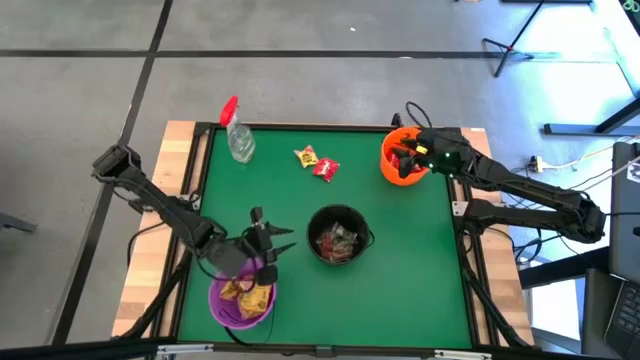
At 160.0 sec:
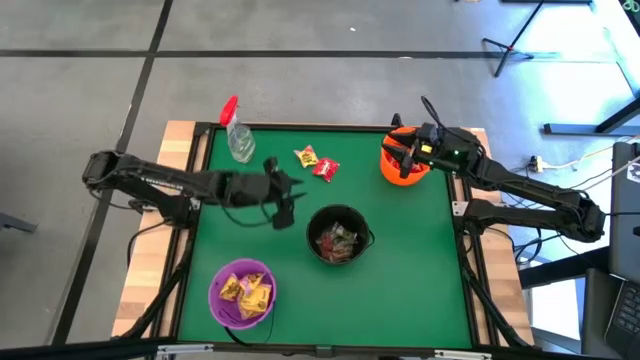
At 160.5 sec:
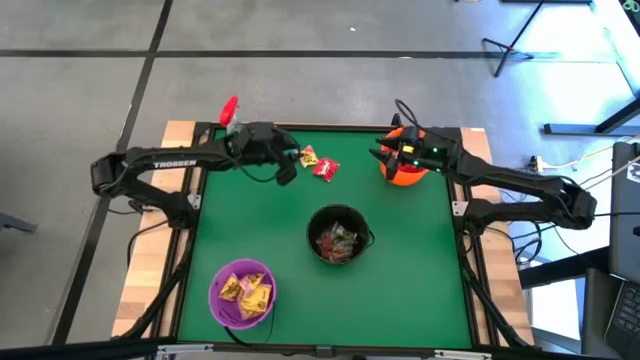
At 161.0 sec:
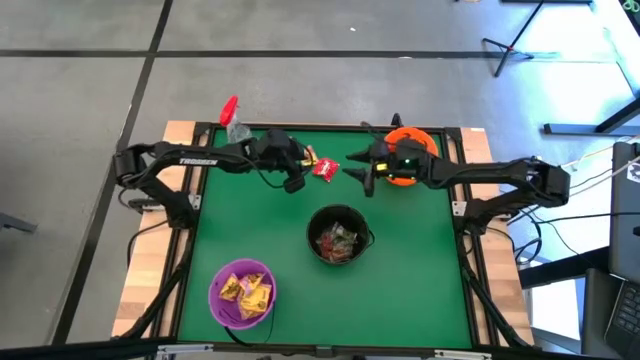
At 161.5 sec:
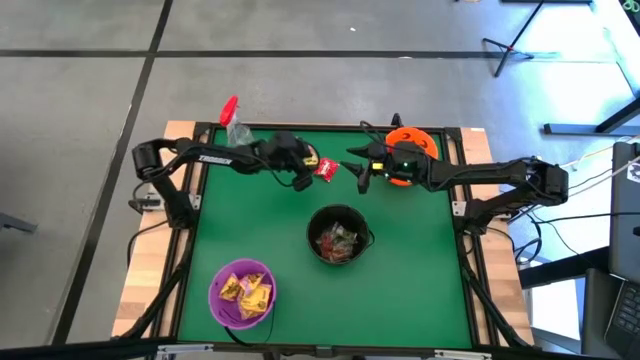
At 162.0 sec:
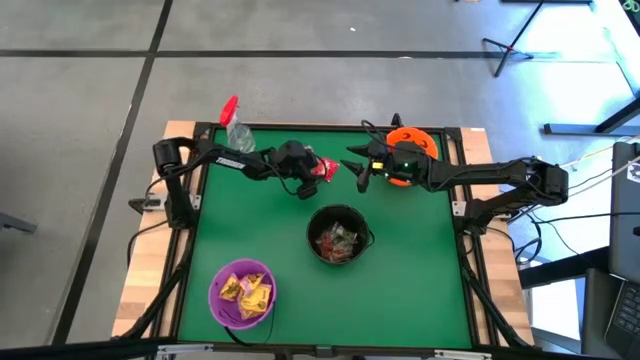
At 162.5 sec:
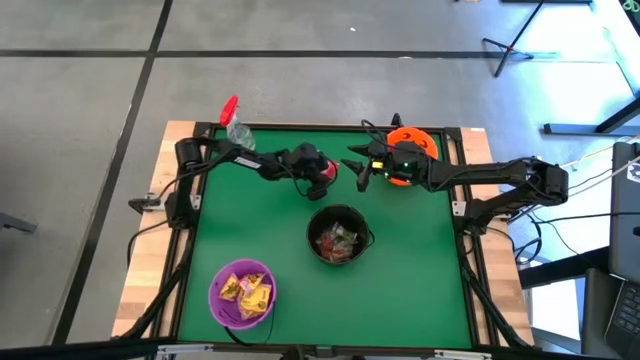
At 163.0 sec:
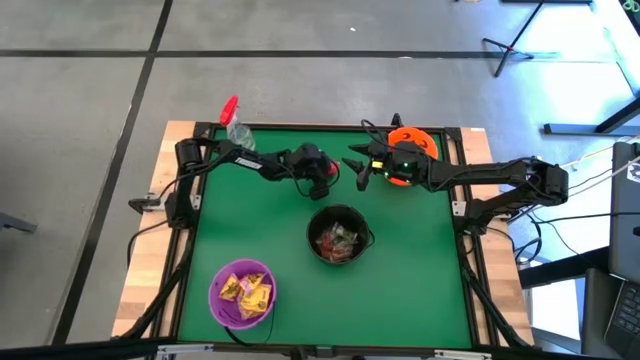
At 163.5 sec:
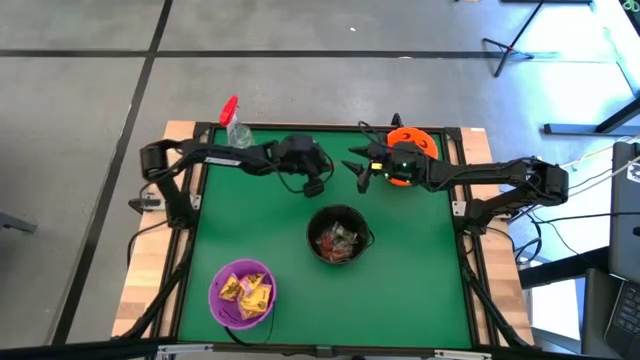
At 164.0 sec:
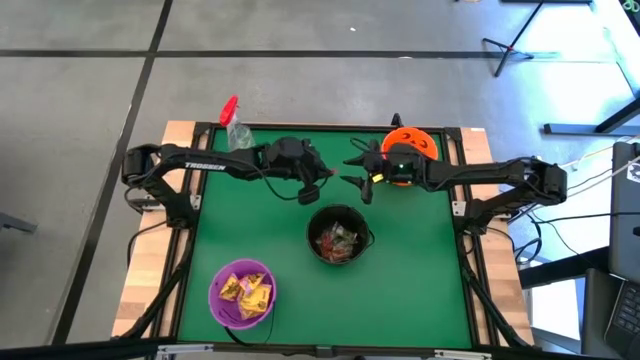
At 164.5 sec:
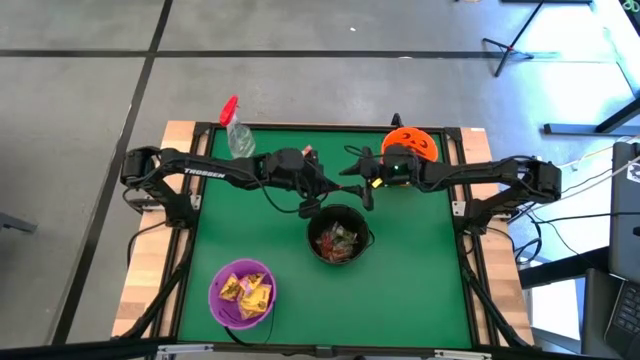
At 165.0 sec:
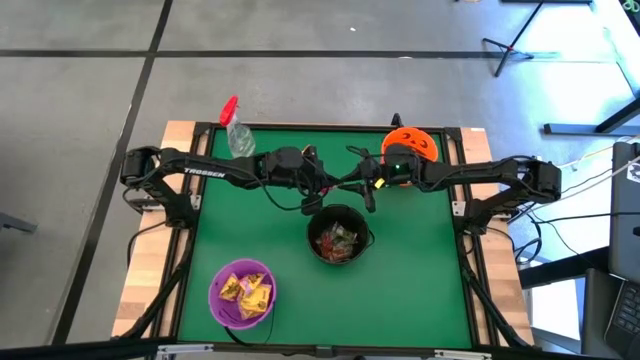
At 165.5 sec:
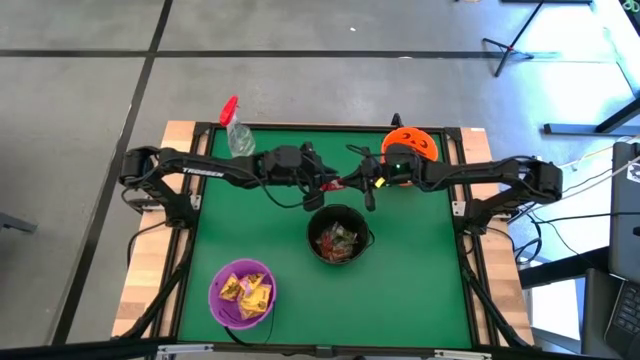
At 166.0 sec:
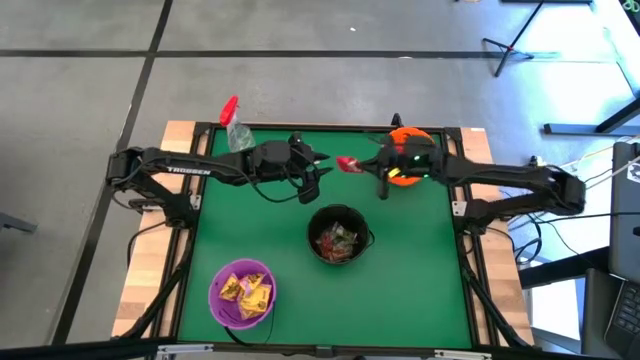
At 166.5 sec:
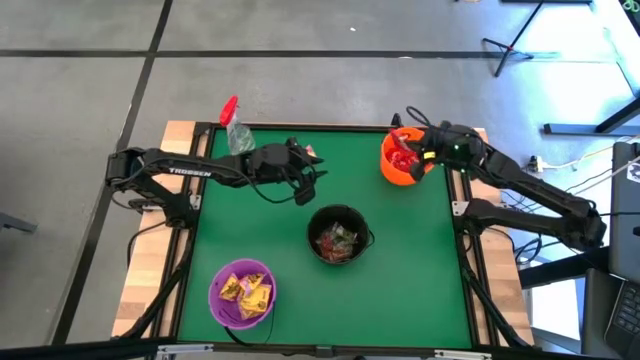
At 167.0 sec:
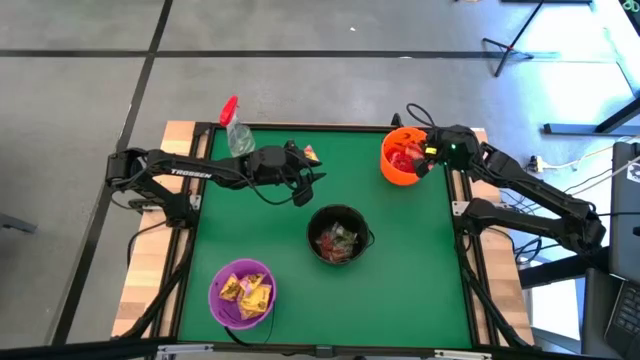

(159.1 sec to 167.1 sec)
Task: Sort candy
Put the red candy into the orange bucket

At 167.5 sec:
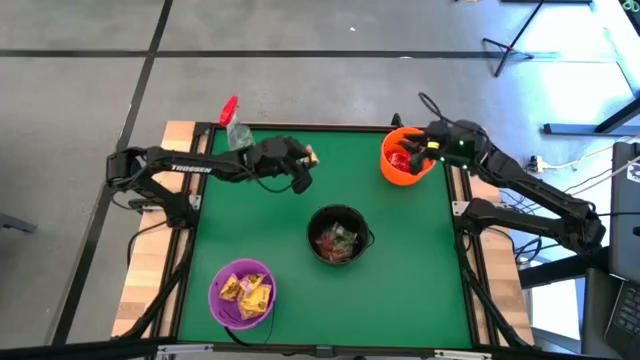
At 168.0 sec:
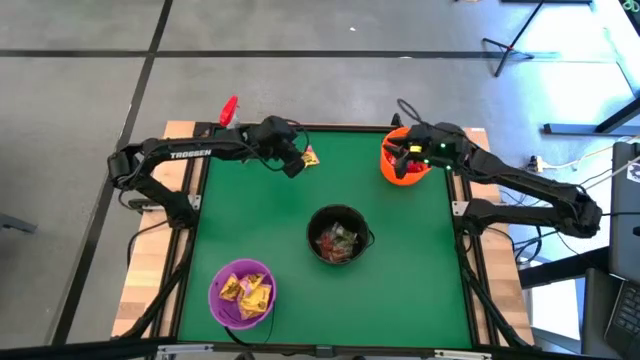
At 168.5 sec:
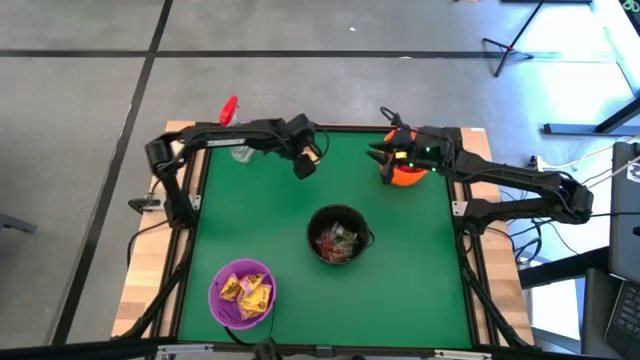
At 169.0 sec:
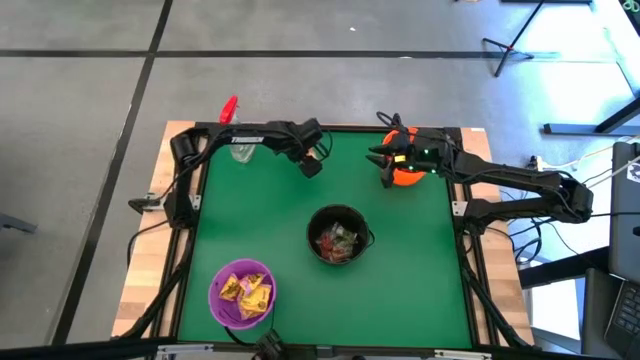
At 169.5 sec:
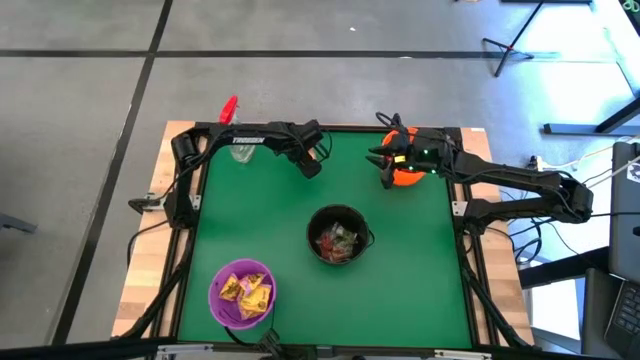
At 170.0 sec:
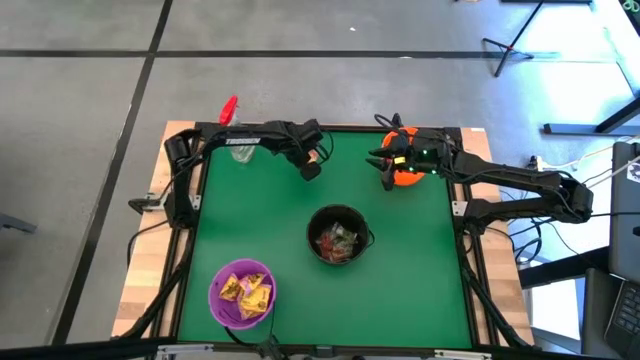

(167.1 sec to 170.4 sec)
Put the yellow candy into the purple bucket

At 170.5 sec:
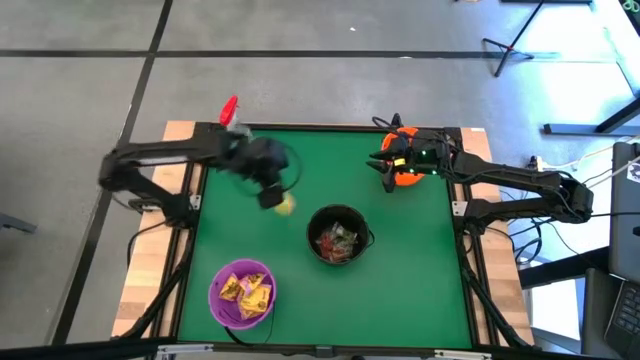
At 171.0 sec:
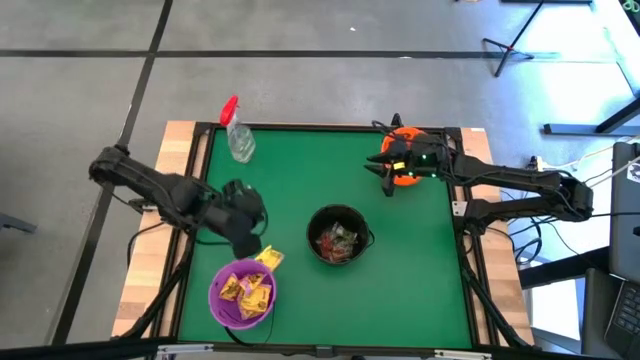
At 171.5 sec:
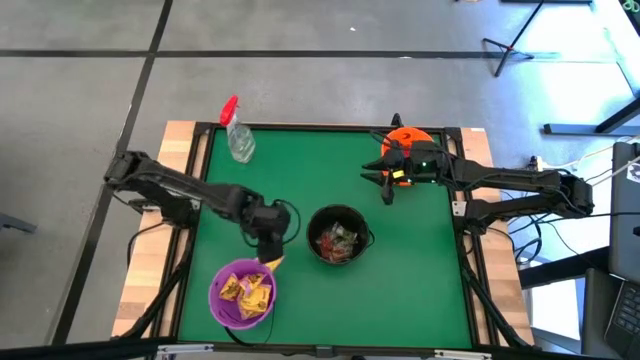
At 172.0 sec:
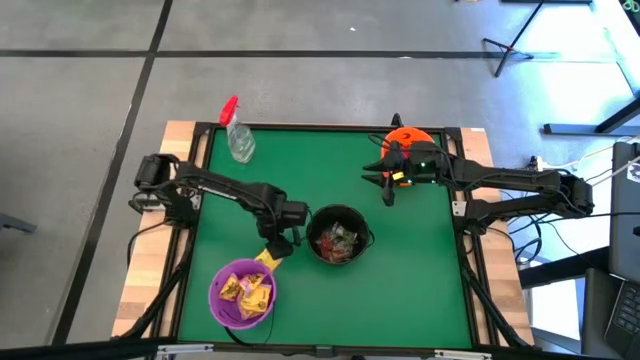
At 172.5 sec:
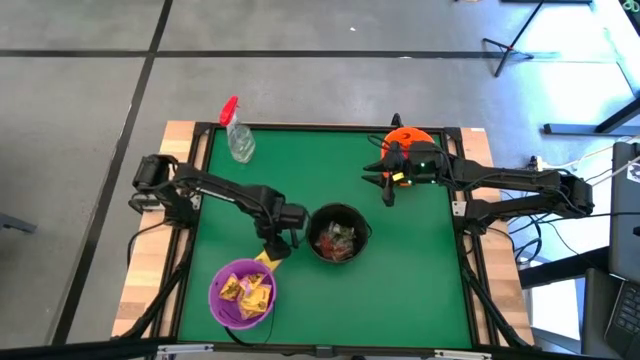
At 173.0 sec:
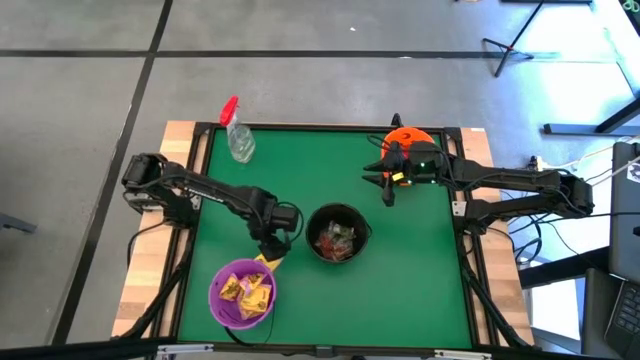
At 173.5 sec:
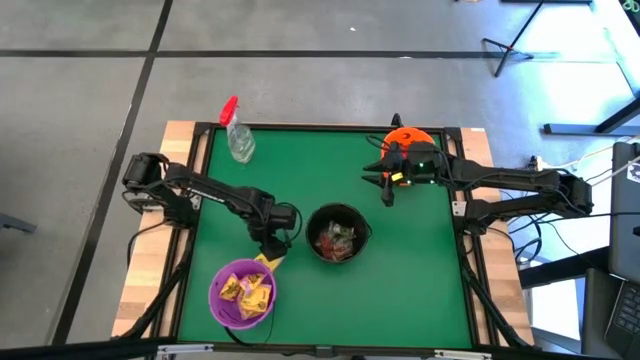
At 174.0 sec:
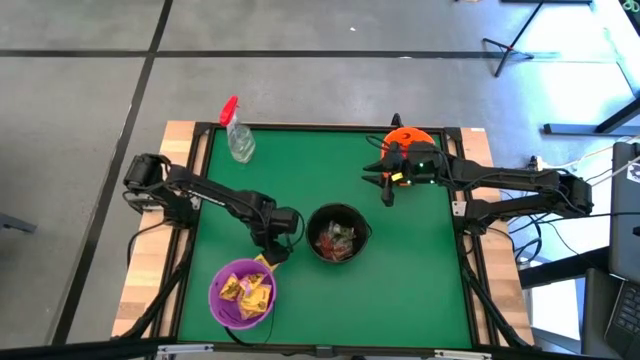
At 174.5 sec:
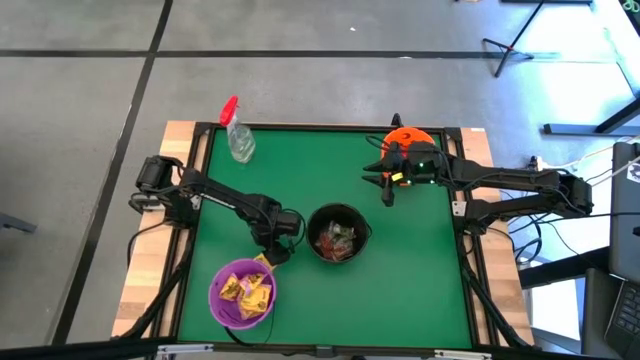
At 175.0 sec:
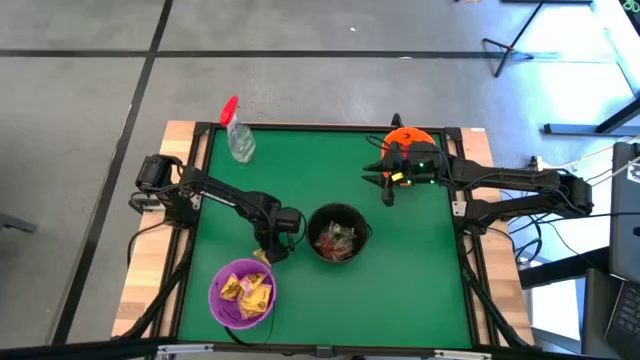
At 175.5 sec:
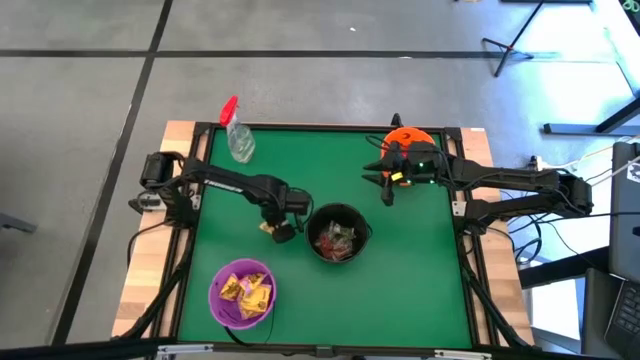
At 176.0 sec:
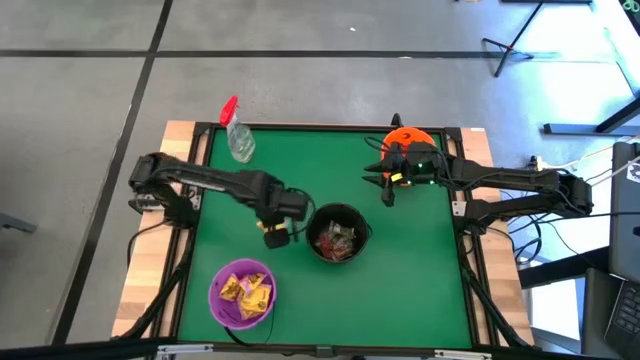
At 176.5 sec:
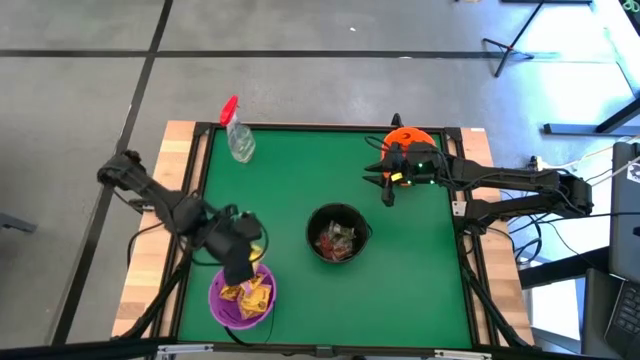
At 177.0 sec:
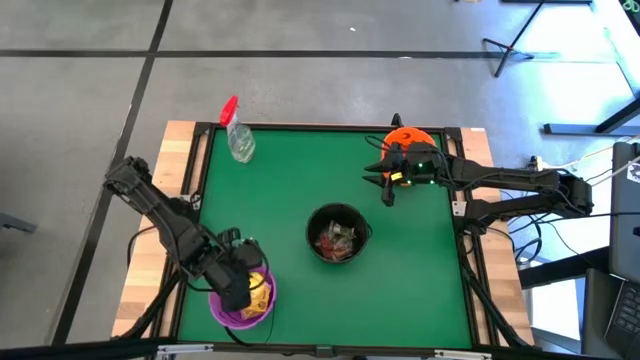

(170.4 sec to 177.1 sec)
Put the yellow candy into the purple bucket

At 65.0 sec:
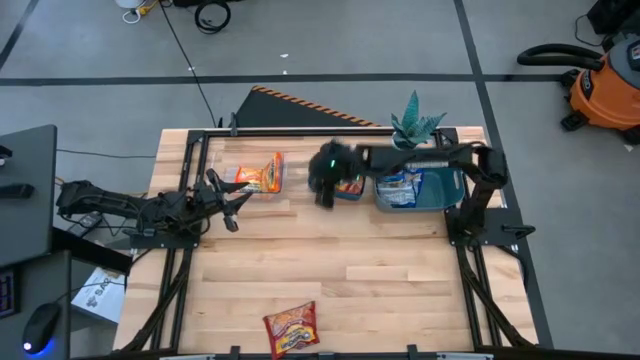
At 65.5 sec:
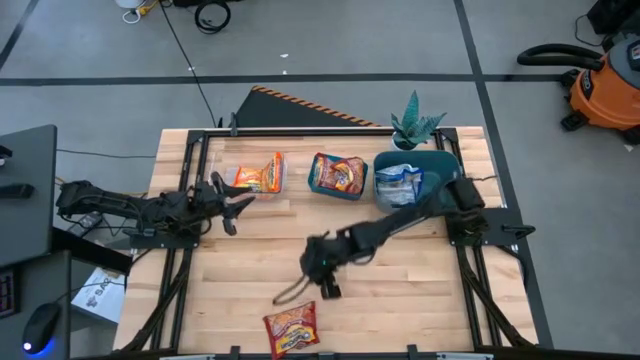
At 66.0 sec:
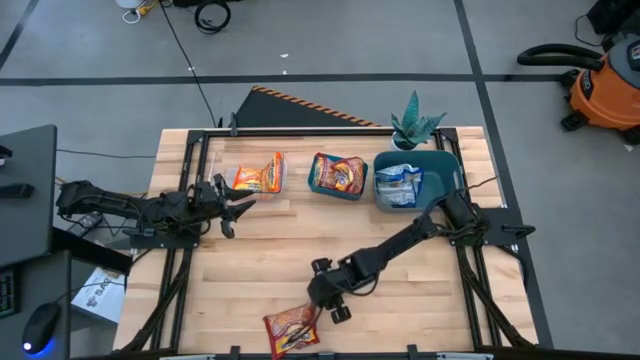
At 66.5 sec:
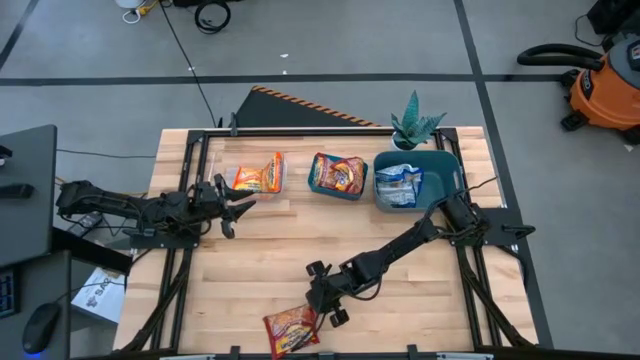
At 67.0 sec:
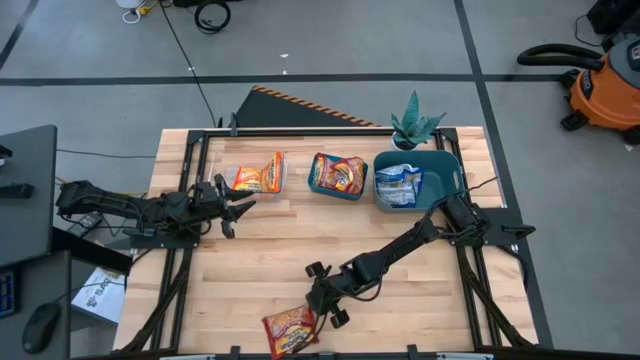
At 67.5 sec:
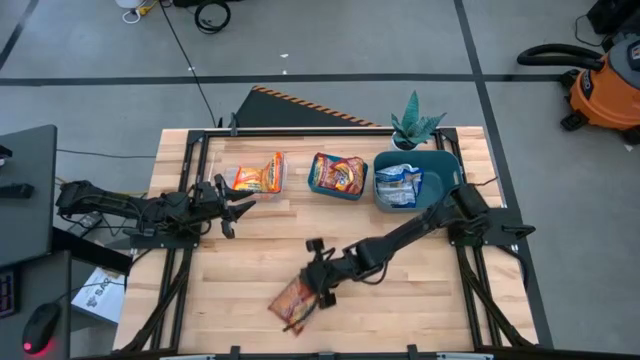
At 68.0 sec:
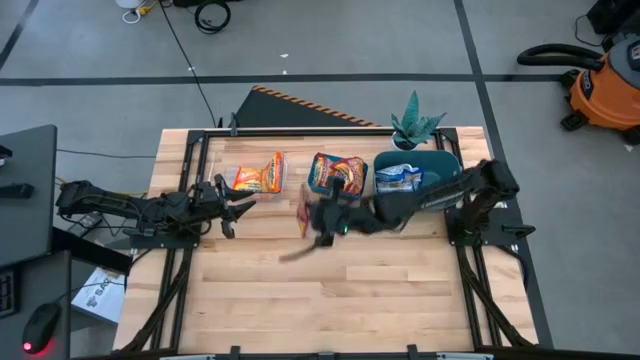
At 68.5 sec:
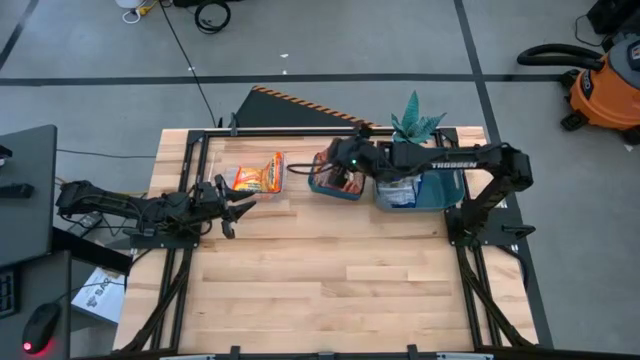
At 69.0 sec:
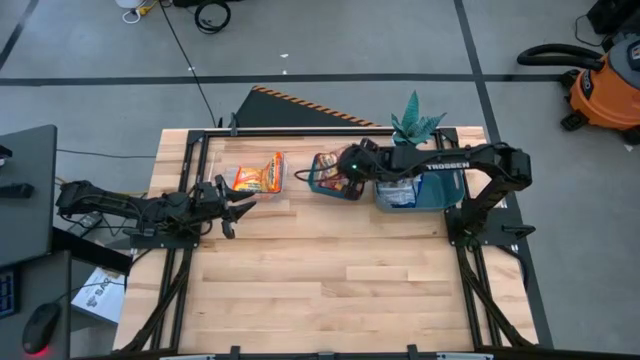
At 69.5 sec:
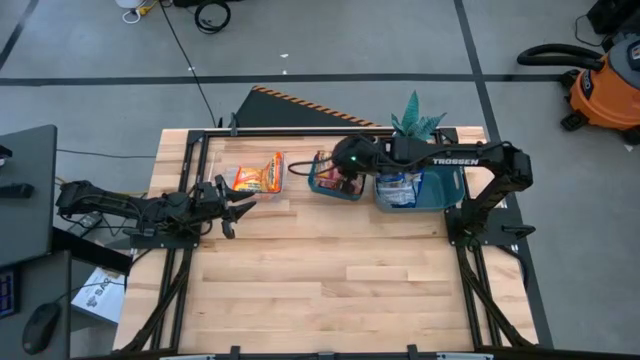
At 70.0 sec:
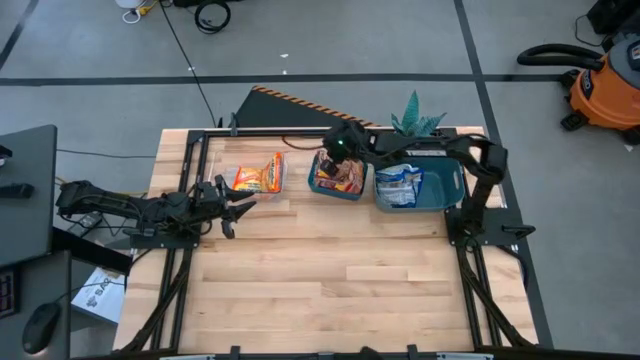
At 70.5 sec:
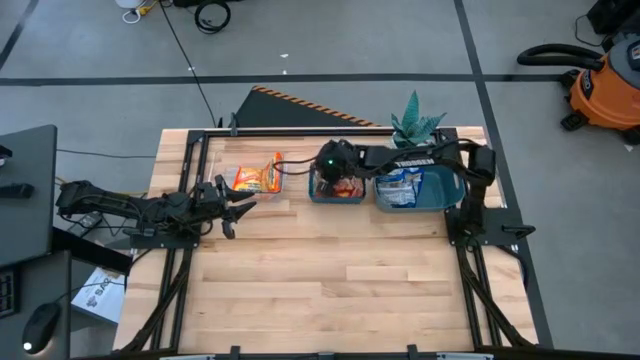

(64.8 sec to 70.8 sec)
Task: Sort Maruchan noodles
Put the red noodle pack into the blue bin
